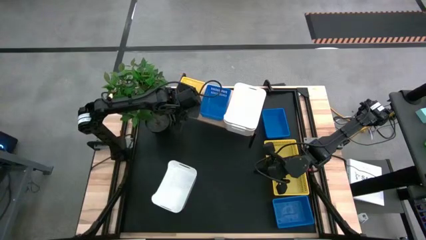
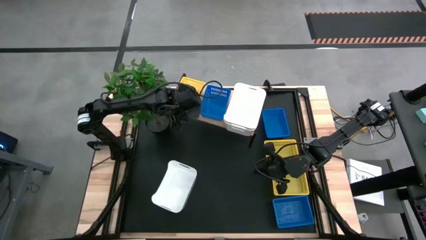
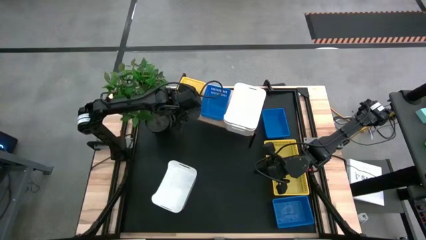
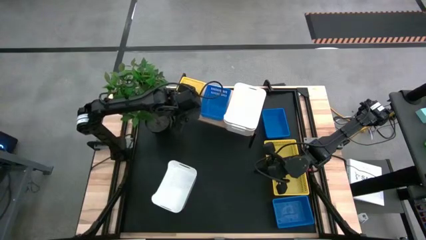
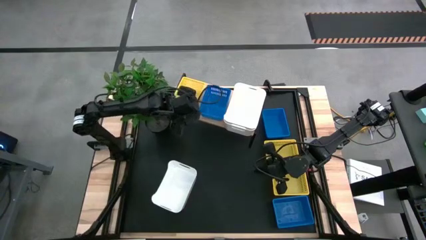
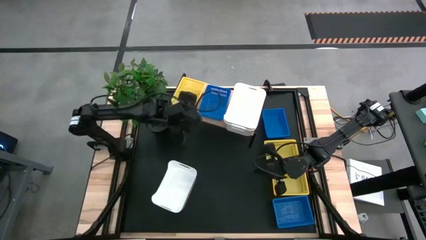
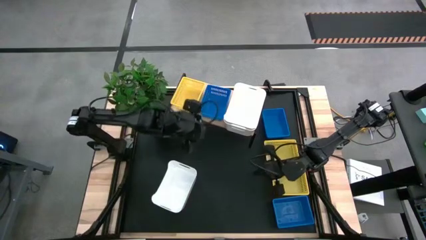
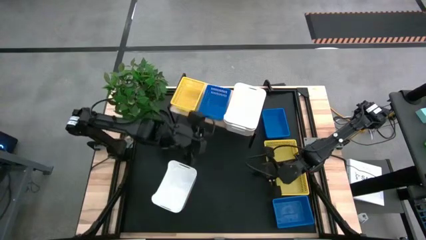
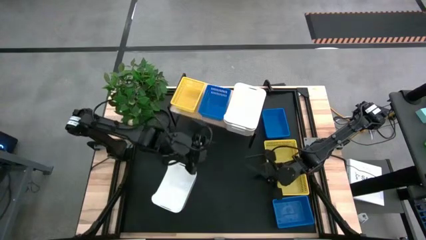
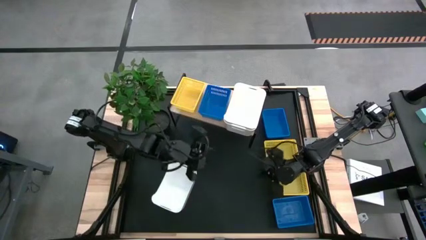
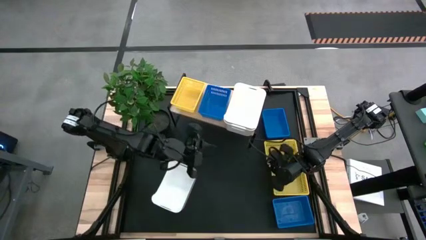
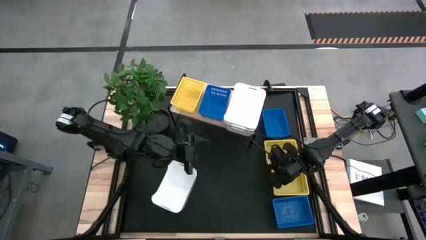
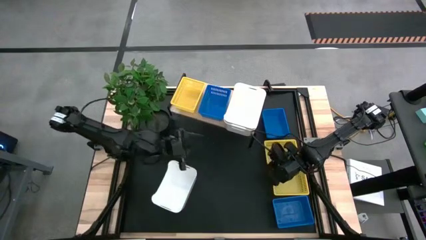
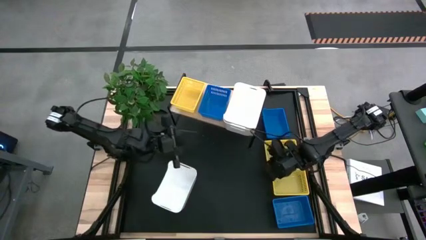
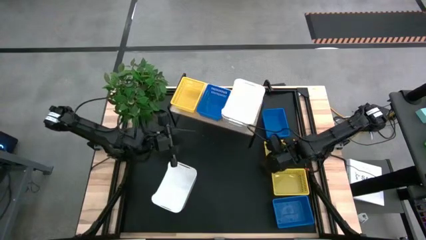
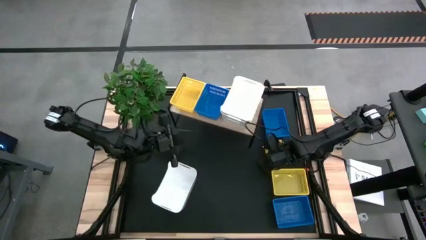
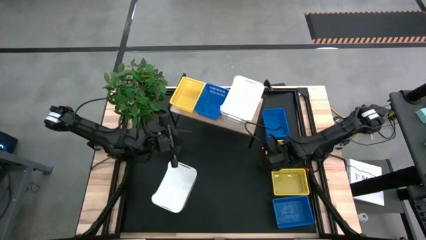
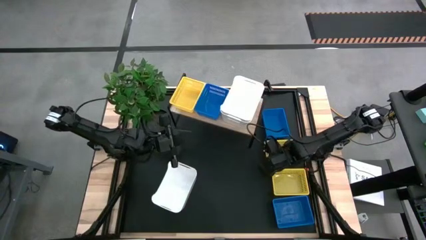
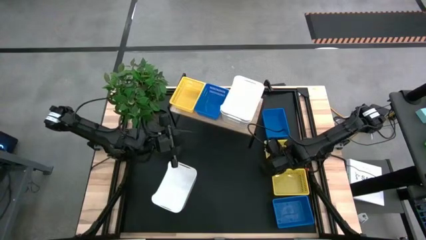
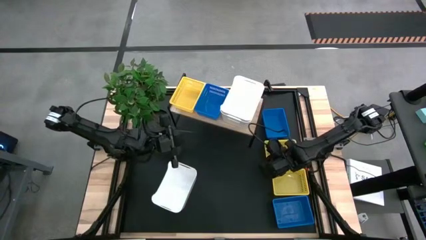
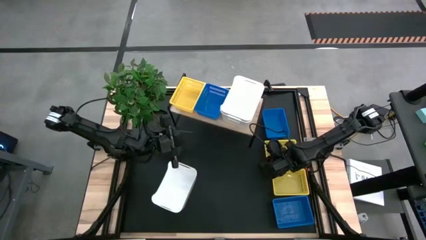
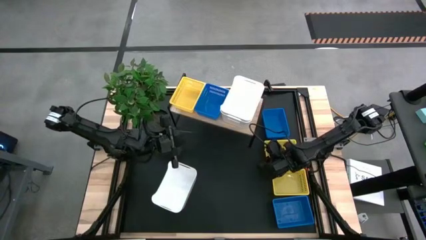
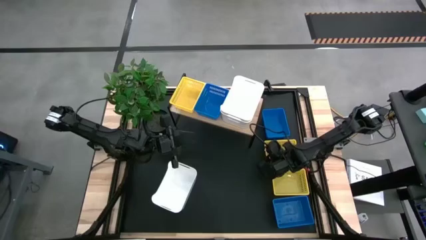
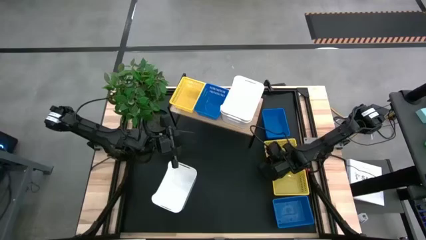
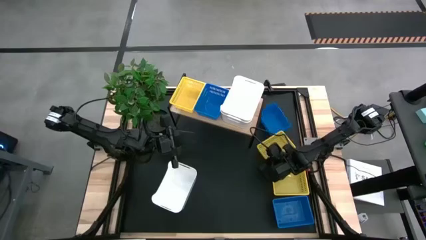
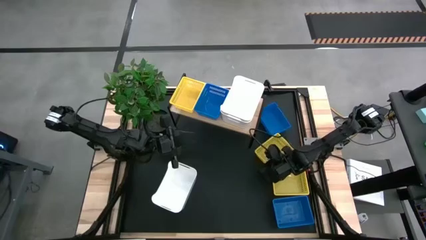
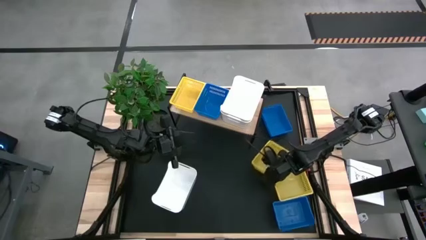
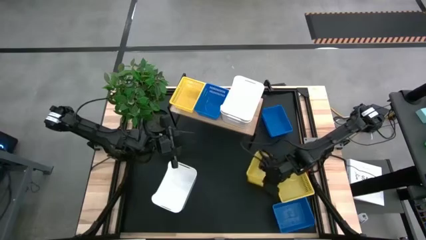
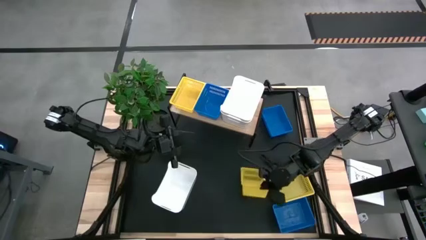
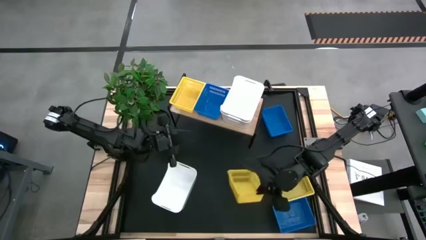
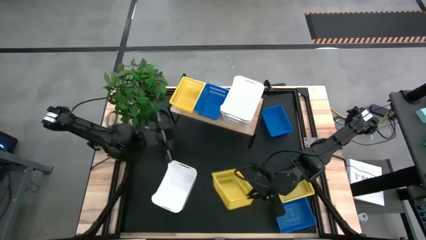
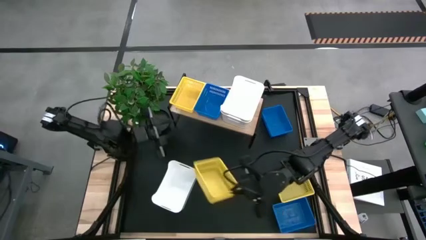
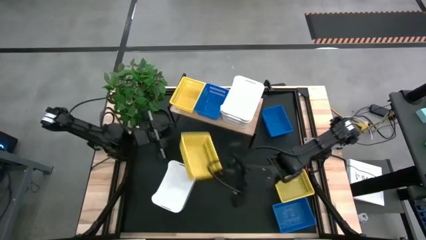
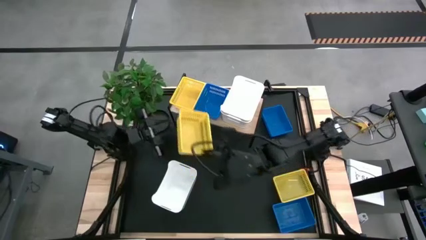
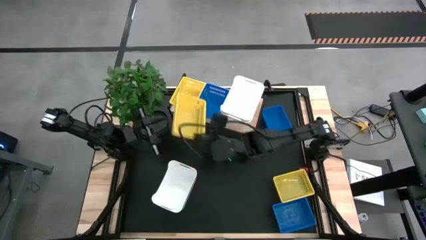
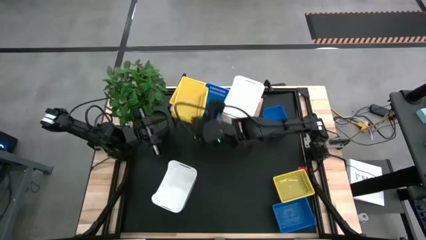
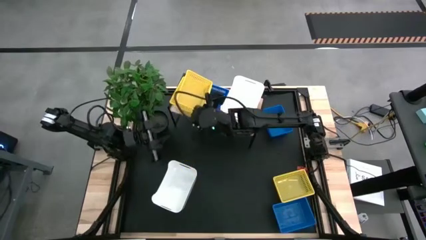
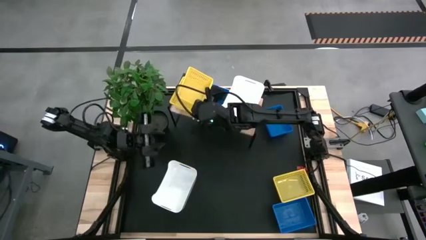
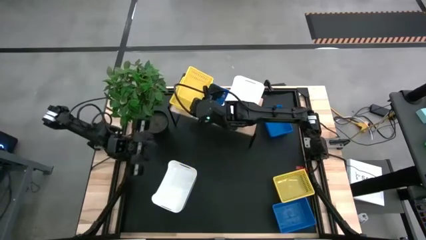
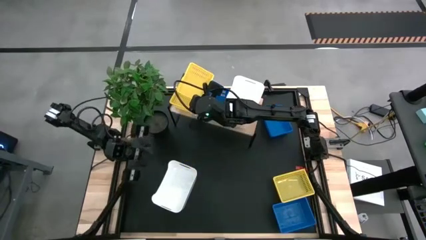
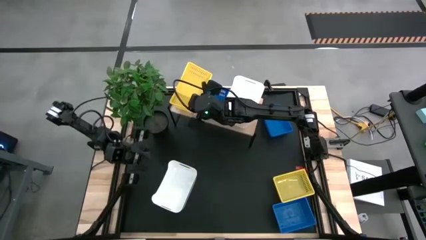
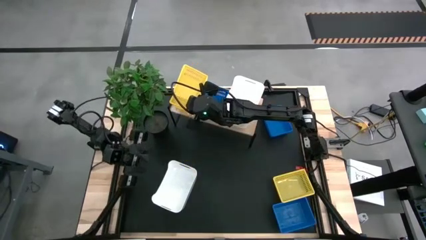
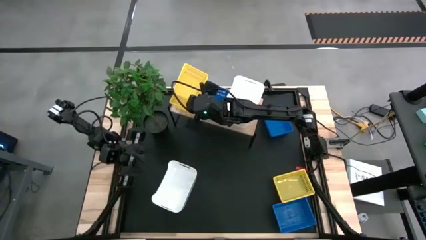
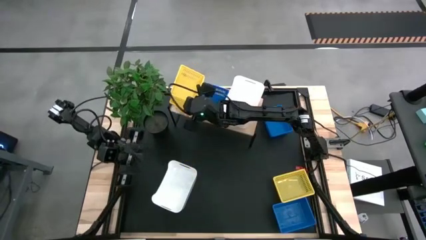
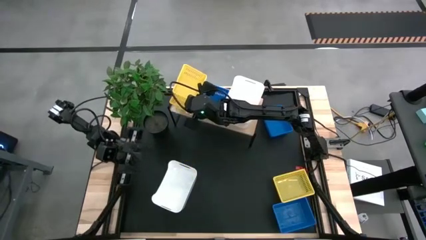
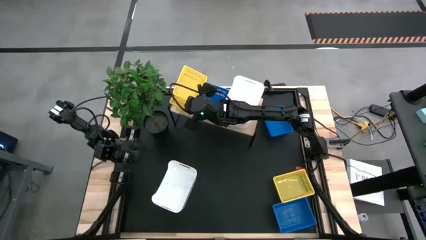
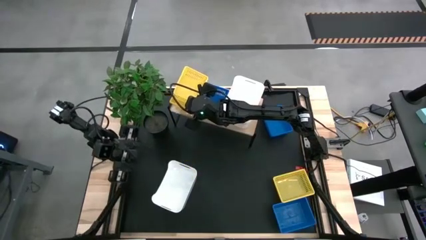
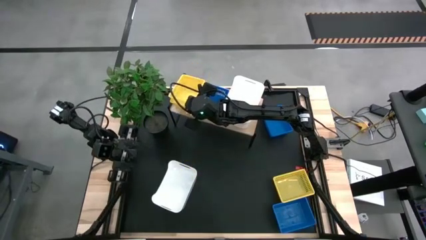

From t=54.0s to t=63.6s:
Task: Stack baskets on shelf by color
Stack the top yellow bin on top of the other yellow bin on the shelf

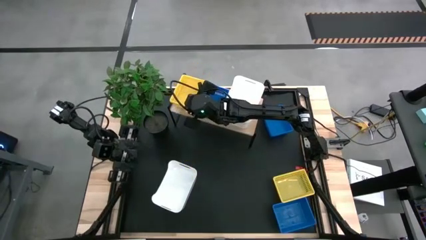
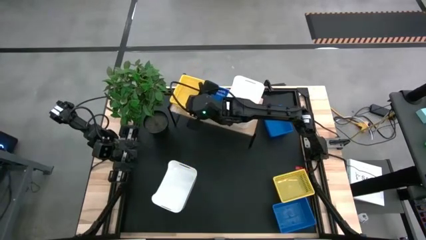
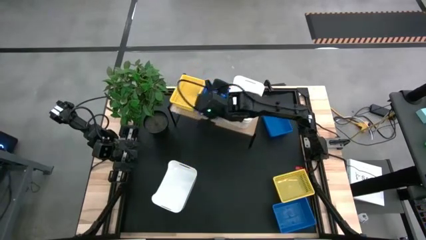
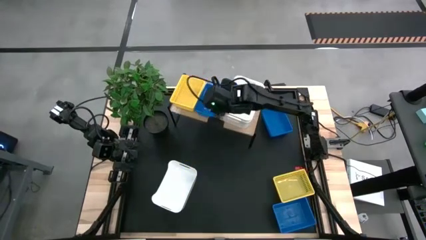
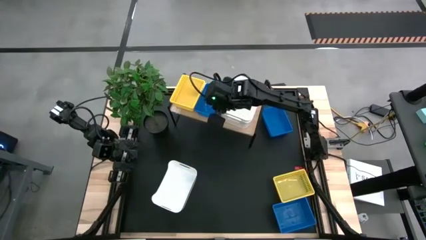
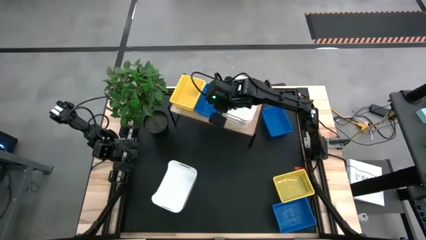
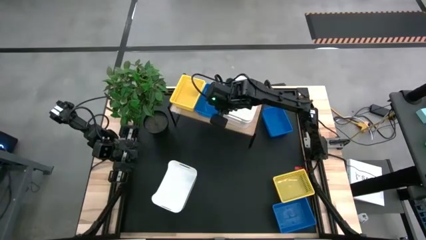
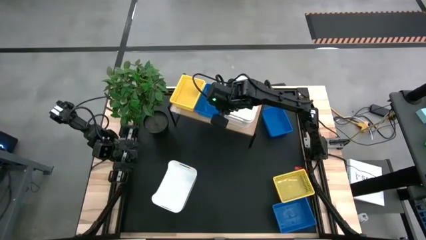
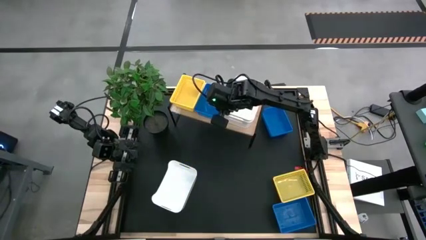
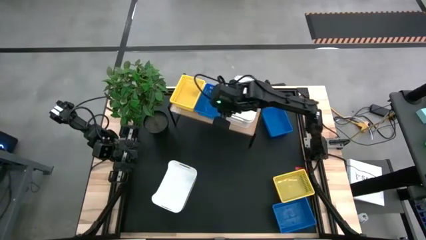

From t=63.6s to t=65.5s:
Adjust the stacked white bins on the shelf

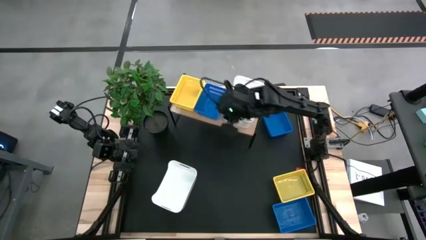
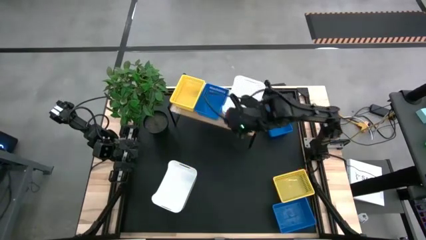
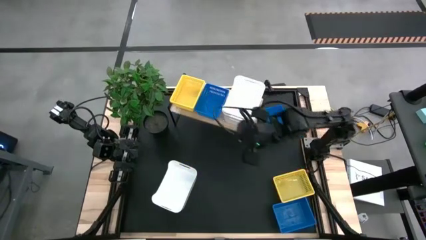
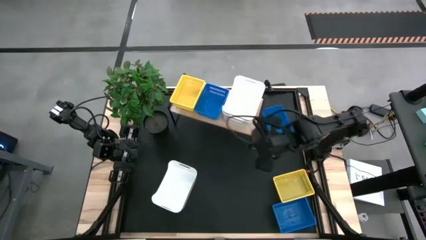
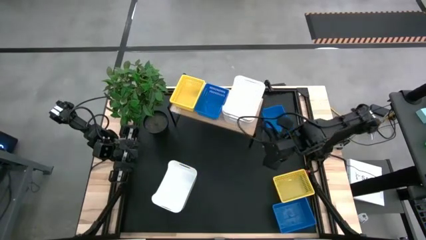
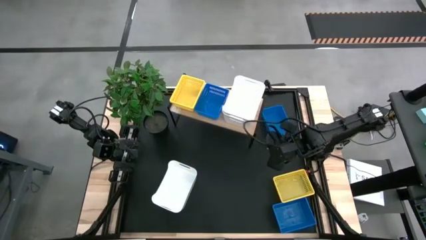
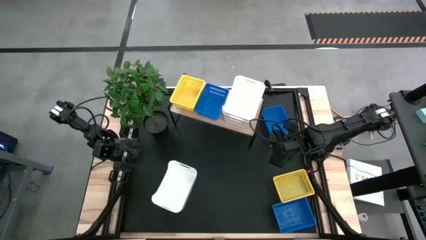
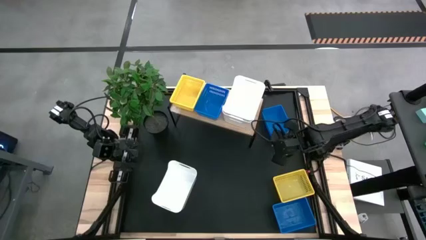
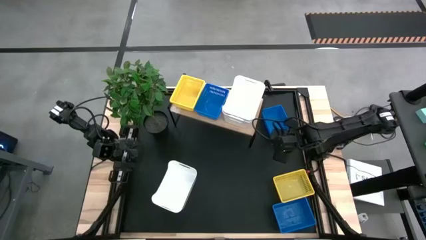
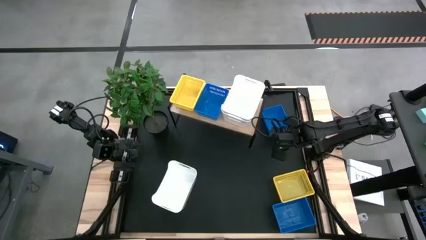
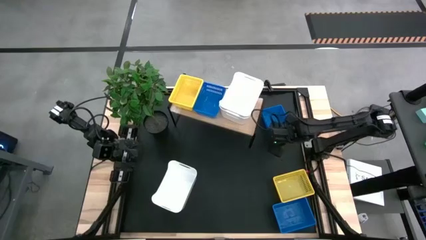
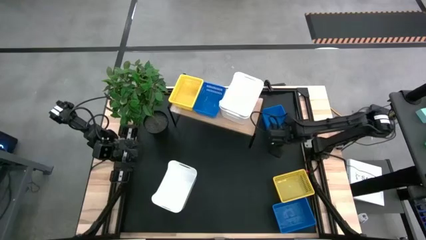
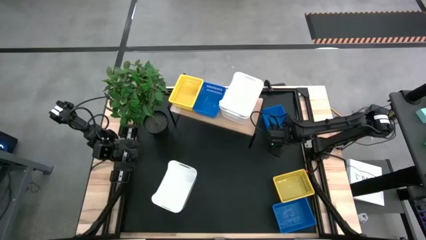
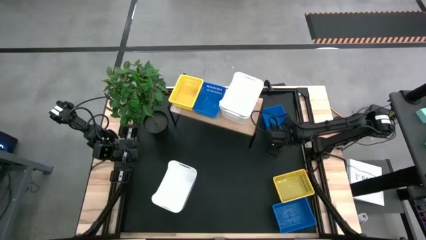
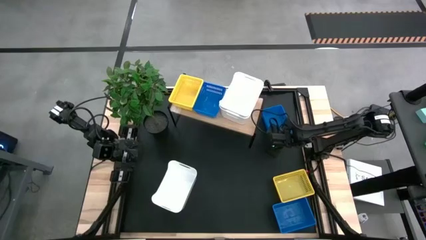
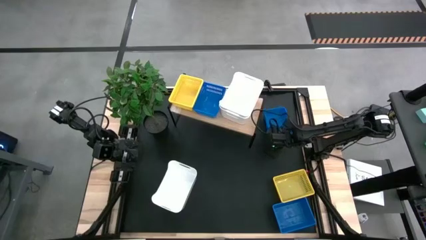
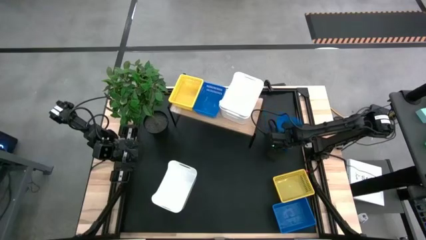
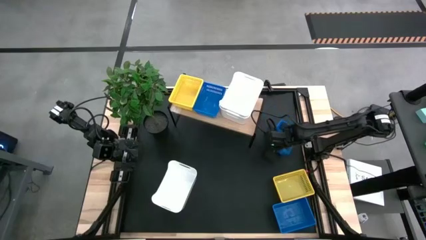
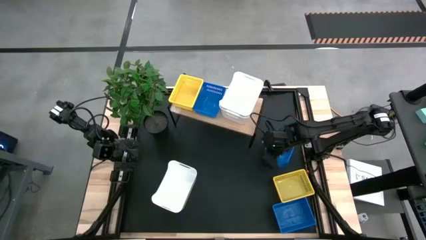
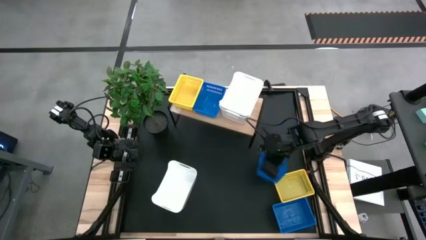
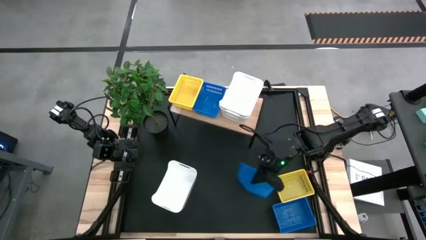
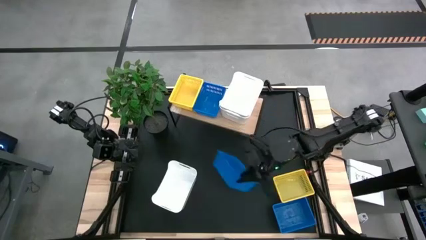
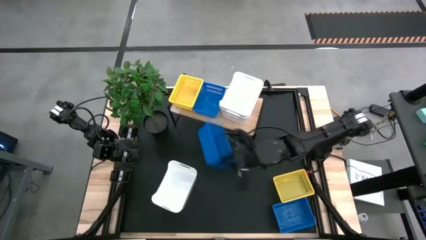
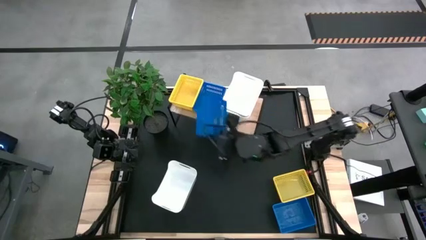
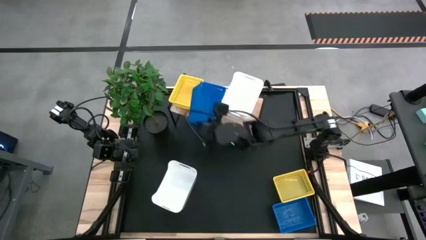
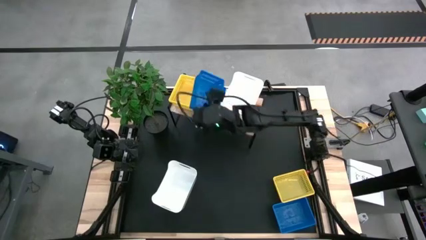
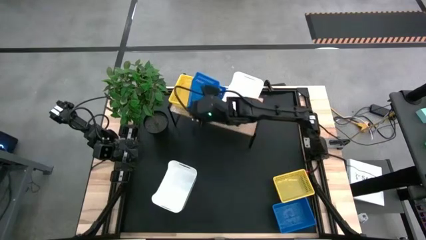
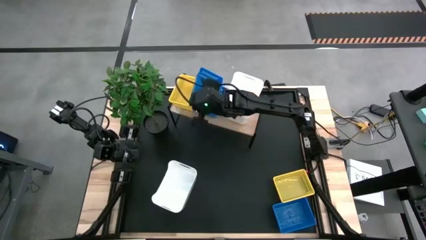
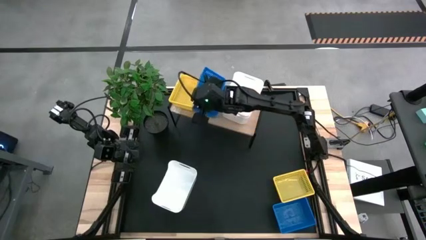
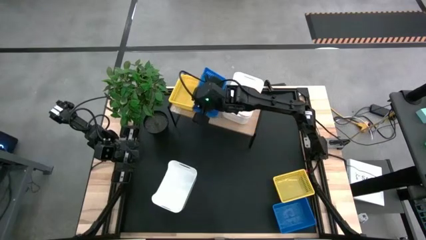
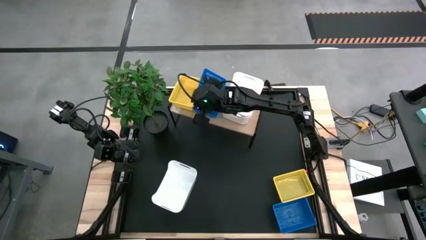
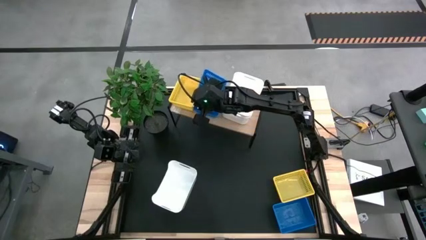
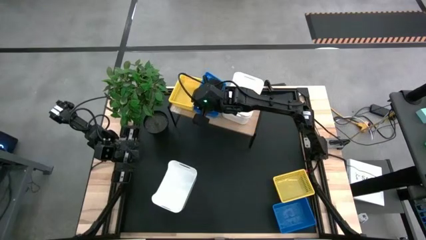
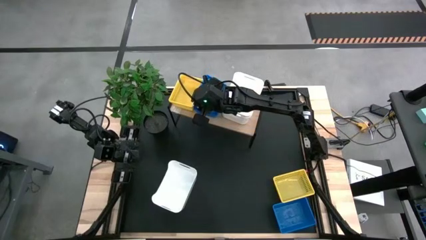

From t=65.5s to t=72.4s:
Stack the top blue bin on top of the other blue bin on the shelf
